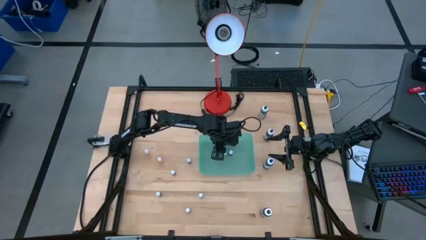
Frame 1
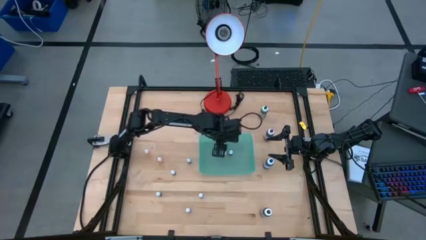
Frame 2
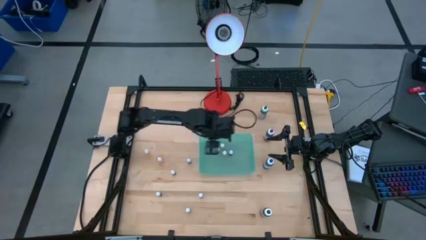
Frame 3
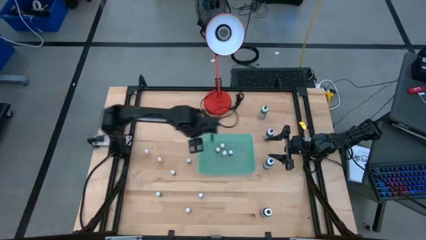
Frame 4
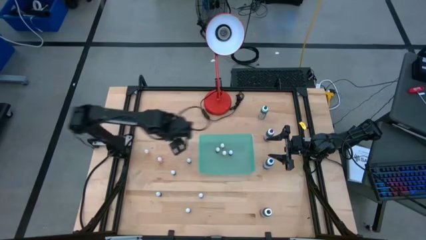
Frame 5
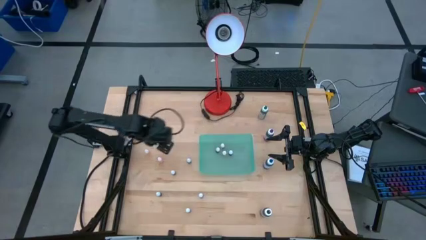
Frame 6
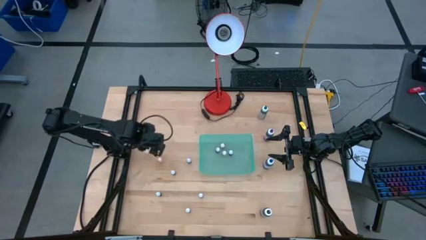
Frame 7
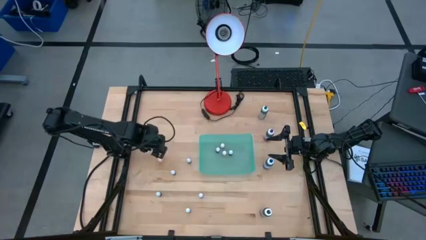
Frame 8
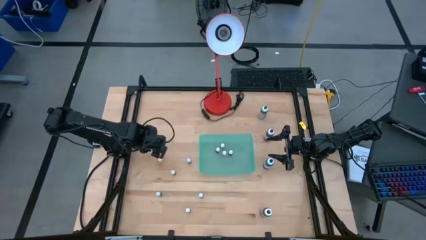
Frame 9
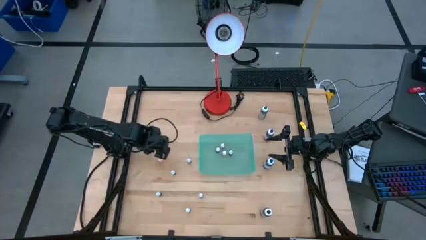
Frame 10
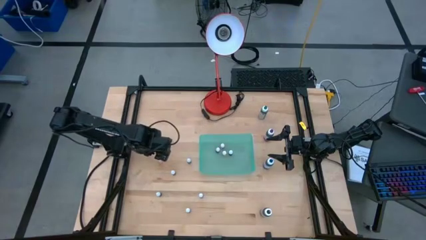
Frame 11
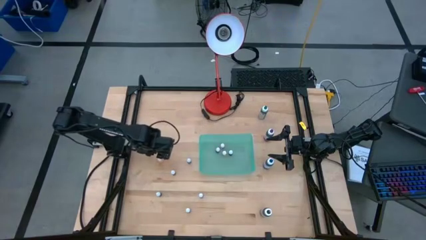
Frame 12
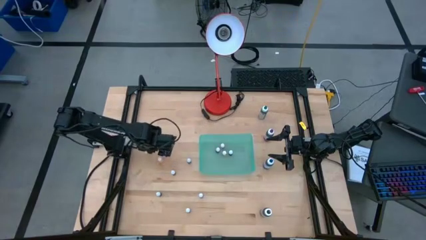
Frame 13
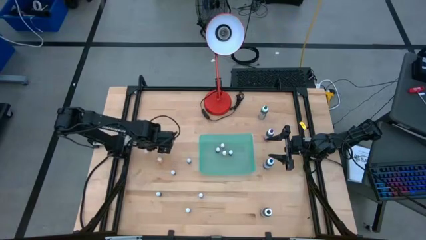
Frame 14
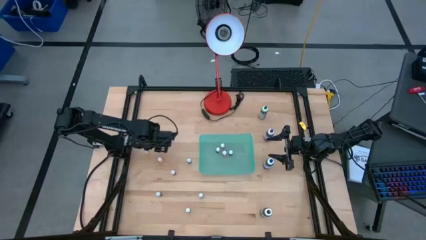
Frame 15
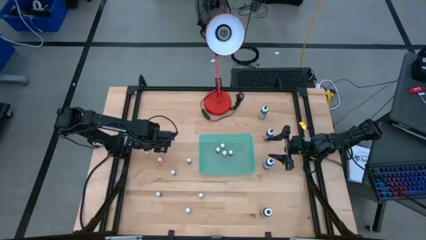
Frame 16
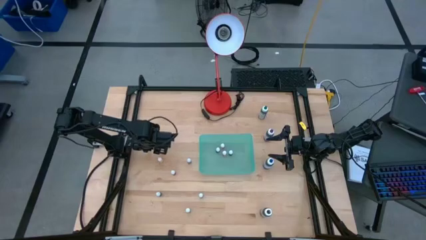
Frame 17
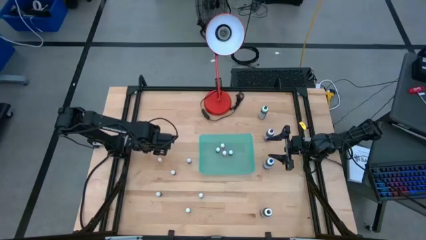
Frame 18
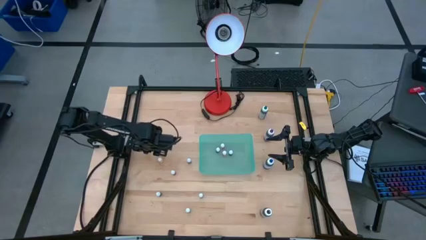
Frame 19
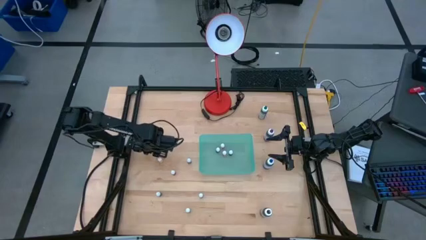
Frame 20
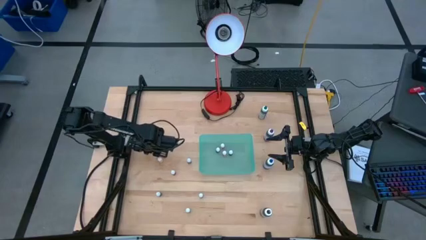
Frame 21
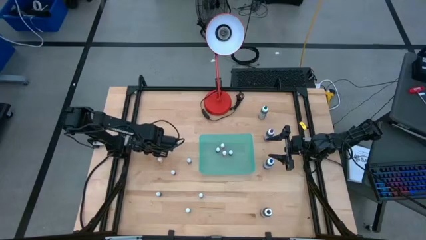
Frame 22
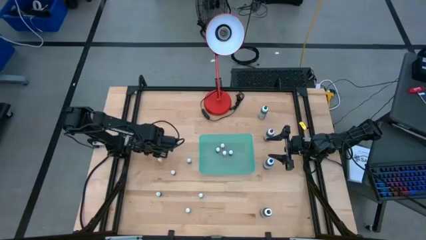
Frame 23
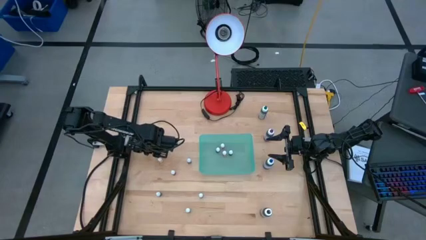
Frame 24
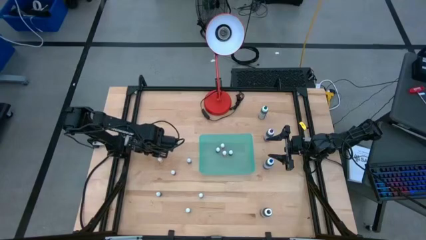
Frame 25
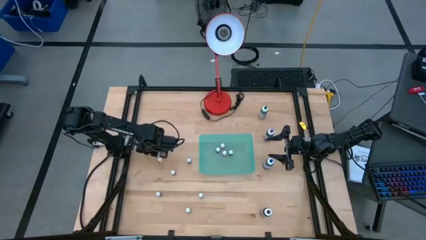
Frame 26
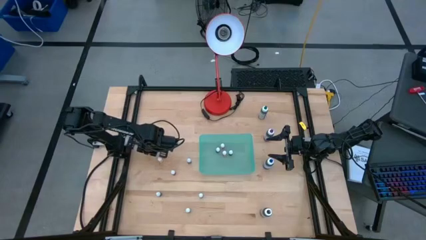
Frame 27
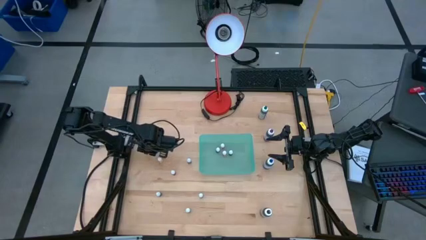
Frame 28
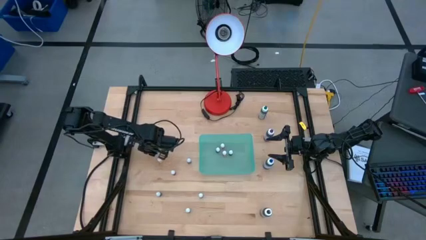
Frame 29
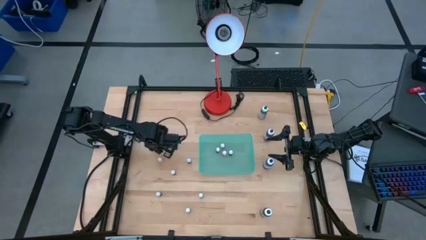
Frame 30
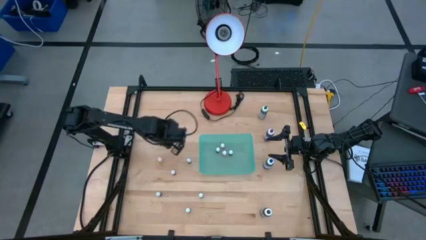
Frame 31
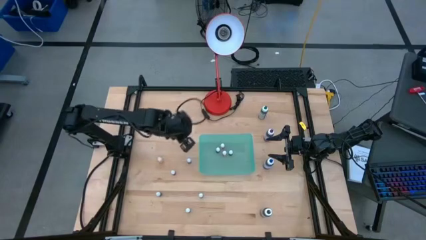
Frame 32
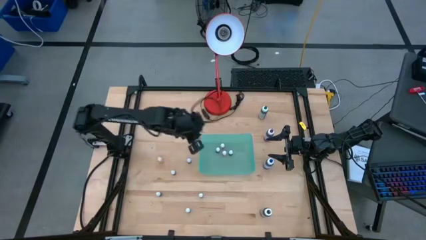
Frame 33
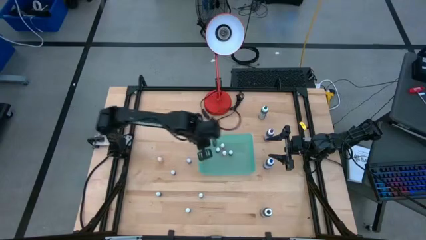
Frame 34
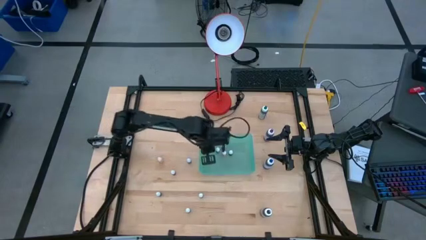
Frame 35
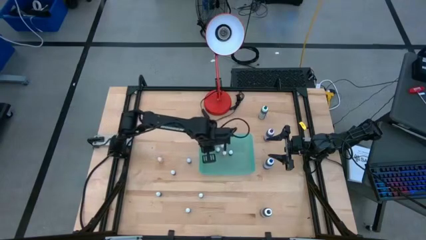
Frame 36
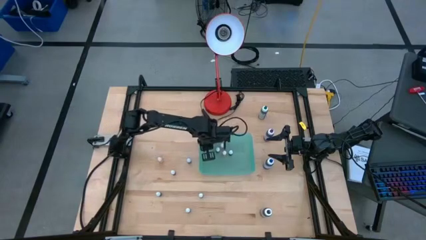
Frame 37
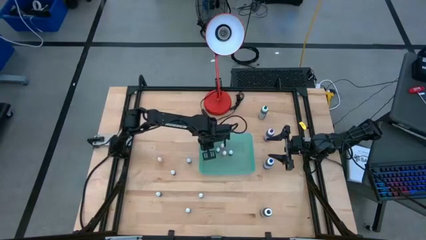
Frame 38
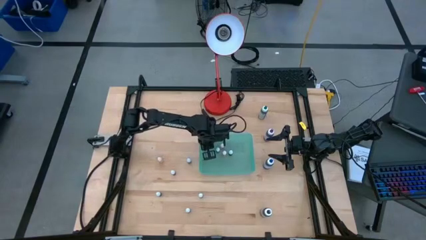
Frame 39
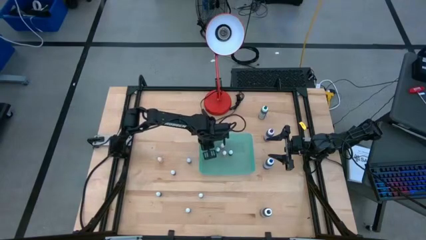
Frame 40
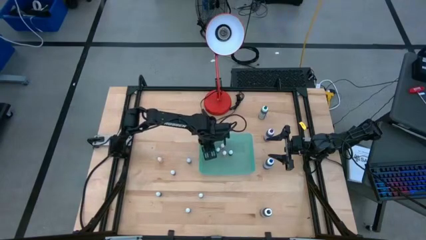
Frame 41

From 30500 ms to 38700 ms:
Task: Pick & Place food coloring
Put the small orange food coloring bottle into the green bin

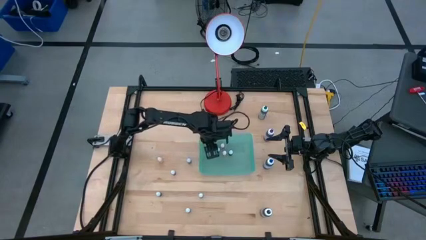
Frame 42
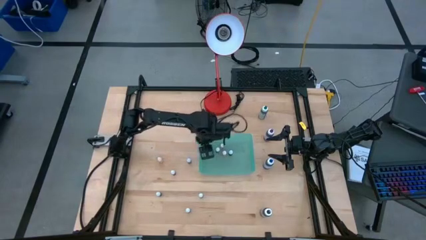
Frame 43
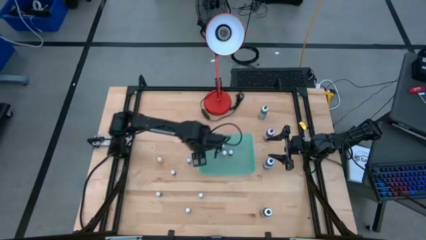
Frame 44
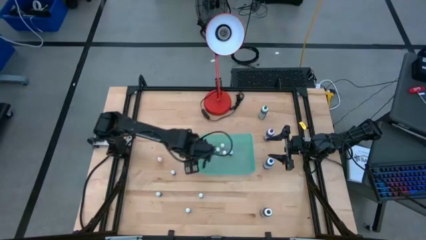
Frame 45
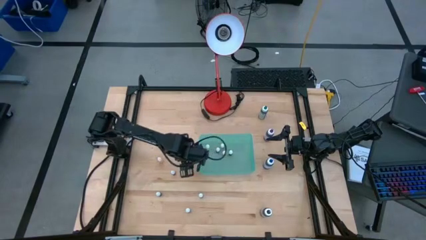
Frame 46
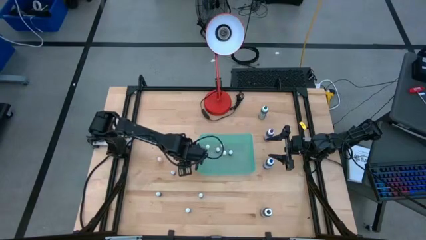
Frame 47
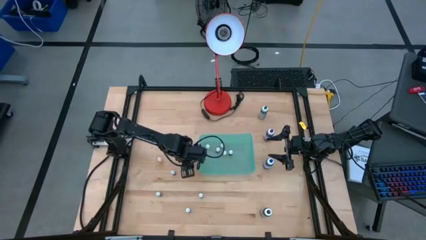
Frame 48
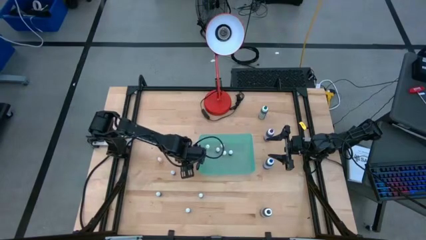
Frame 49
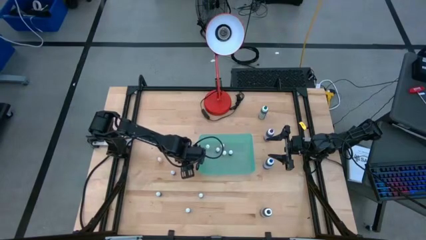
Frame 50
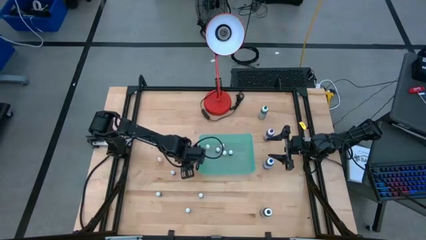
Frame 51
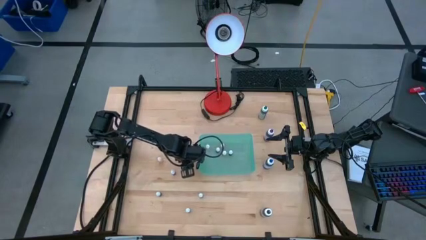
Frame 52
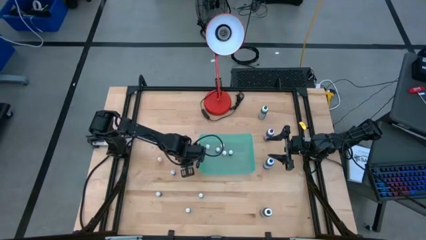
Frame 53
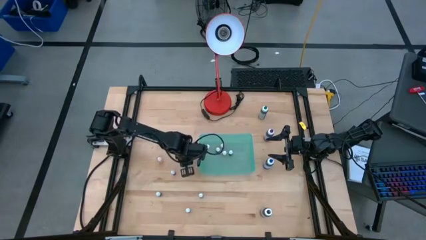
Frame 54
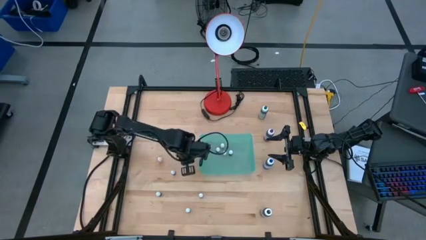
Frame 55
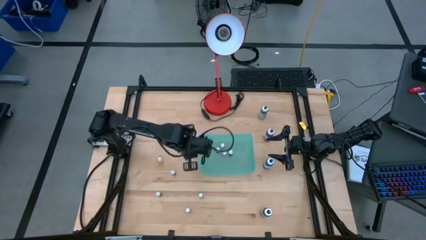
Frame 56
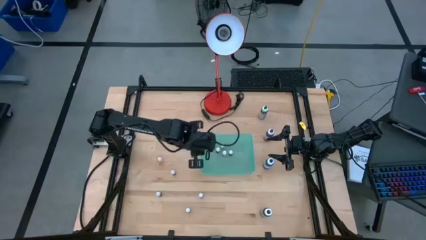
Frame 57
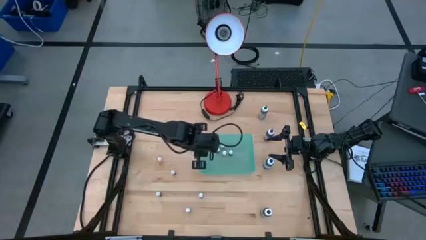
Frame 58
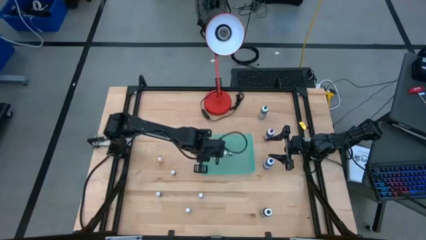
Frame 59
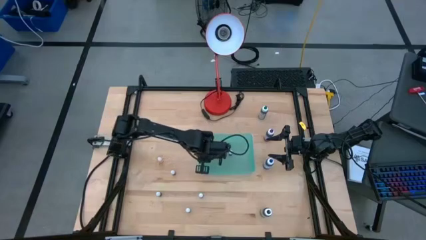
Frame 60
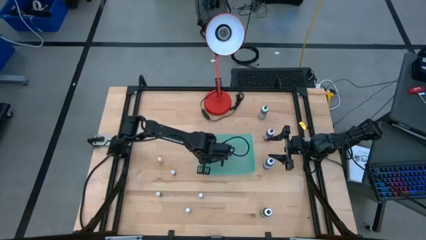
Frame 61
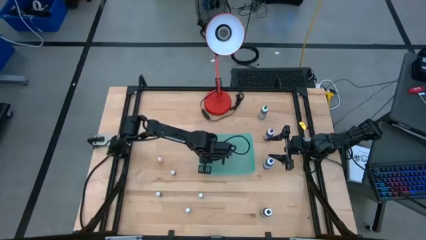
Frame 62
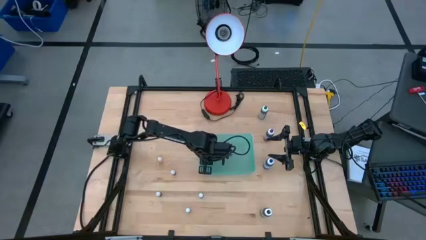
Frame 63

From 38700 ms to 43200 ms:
Put the small green food coloring bottle into the green bin

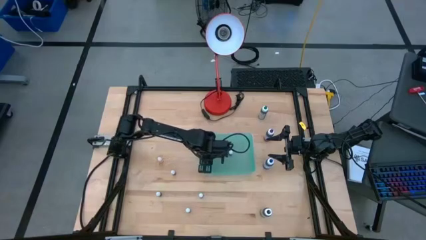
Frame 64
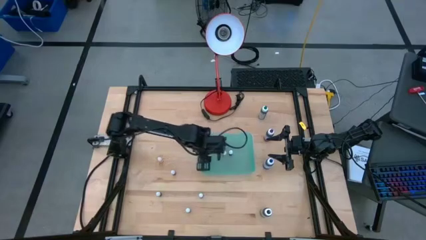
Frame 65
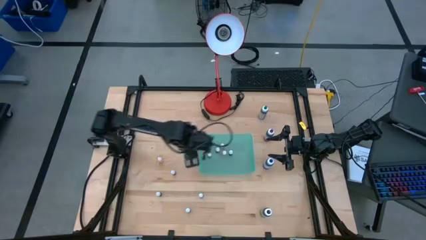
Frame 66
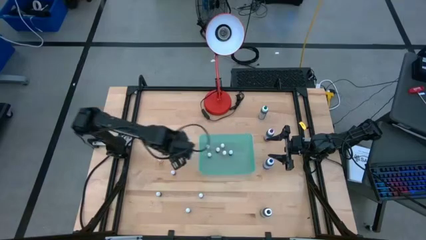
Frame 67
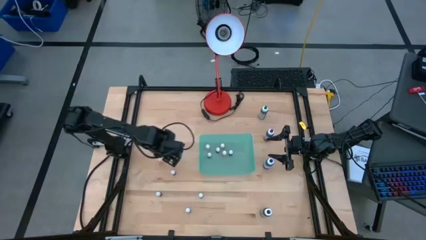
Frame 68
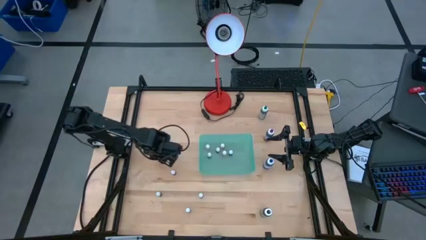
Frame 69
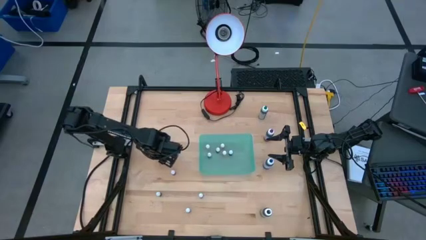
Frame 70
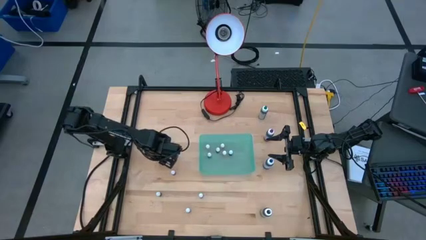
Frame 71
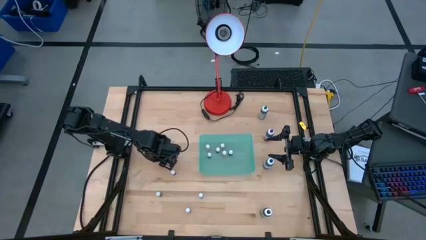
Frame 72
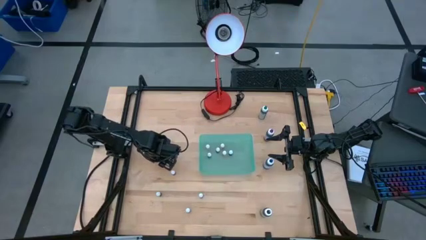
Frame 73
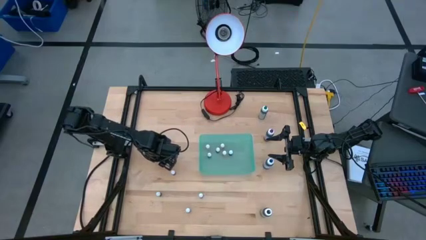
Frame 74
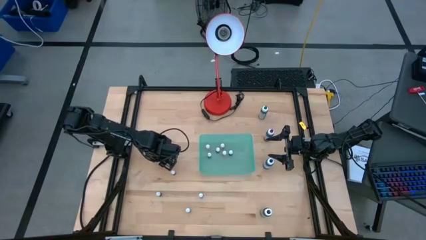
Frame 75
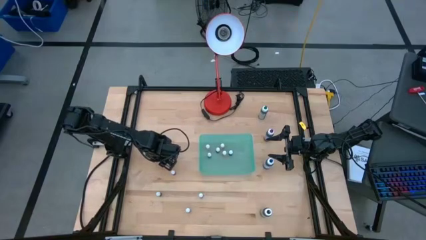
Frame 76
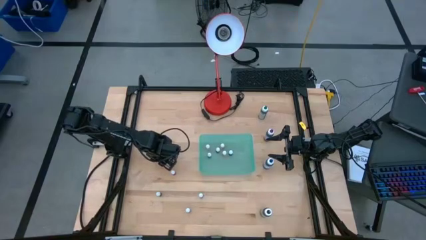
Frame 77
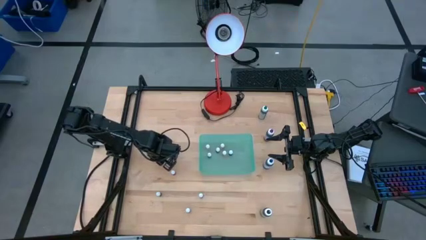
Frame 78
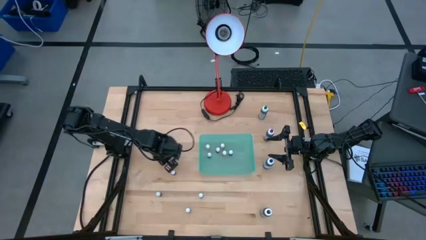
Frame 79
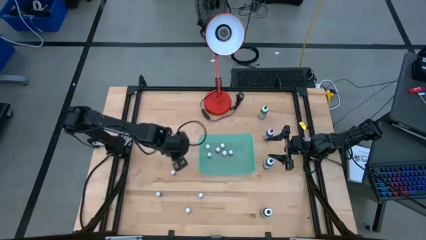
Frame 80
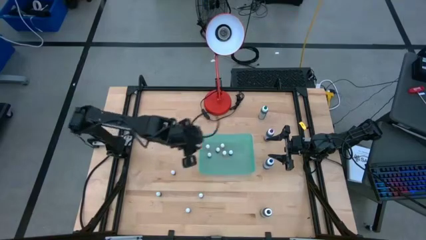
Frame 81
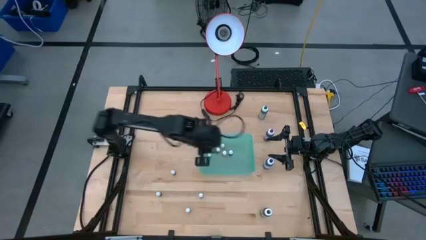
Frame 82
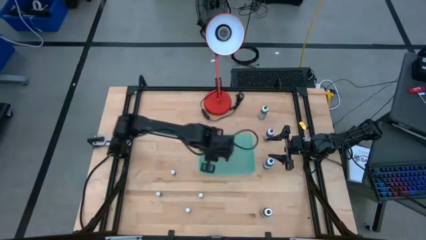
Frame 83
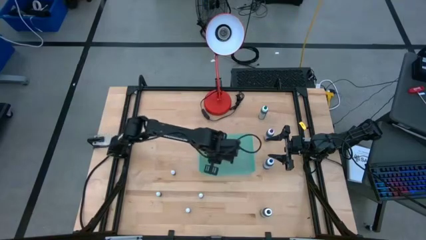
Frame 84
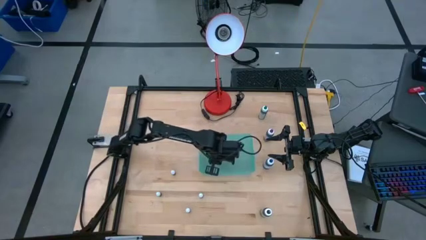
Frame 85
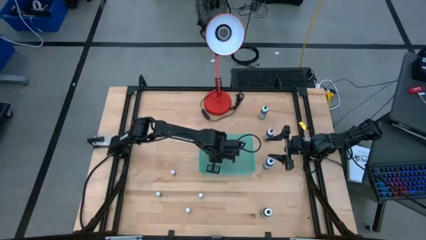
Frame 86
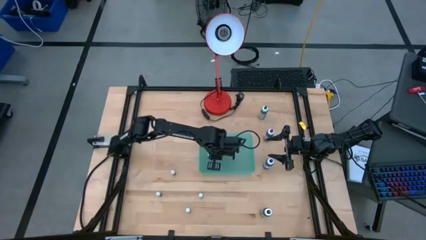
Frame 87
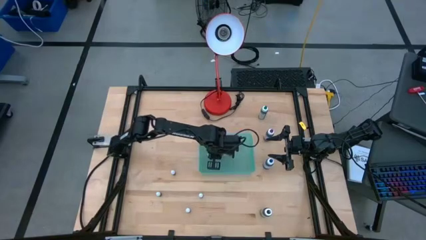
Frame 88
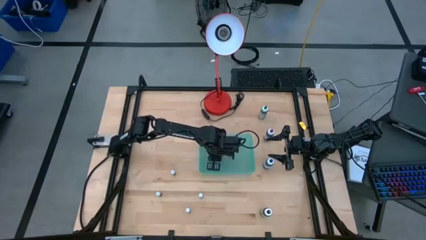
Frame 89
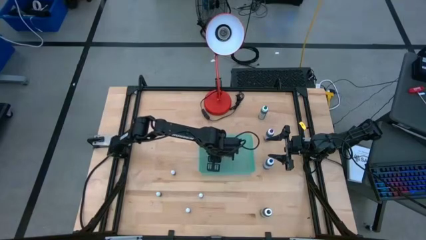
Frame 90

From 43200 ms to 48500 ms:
Put the small orange food coloring bottle into the green bin
